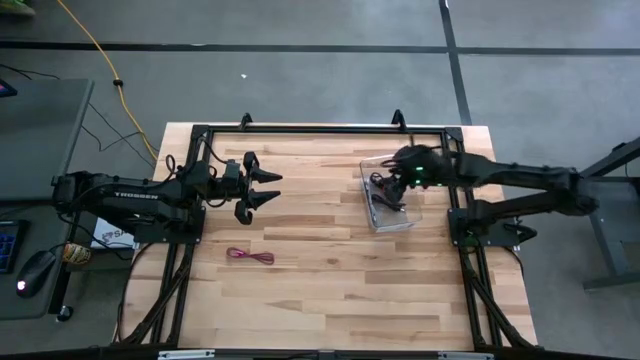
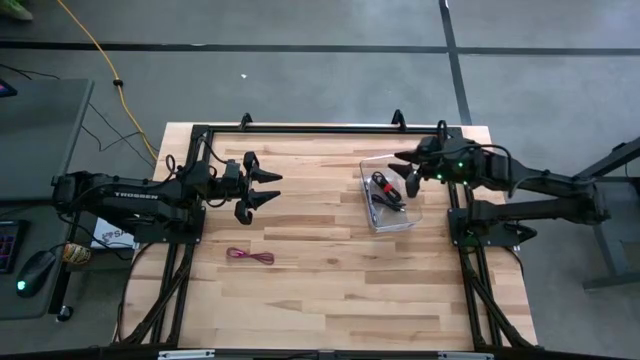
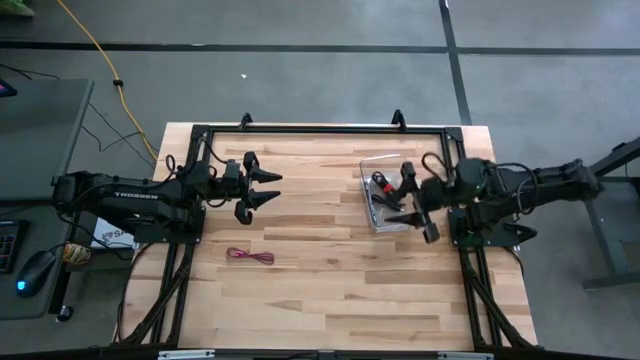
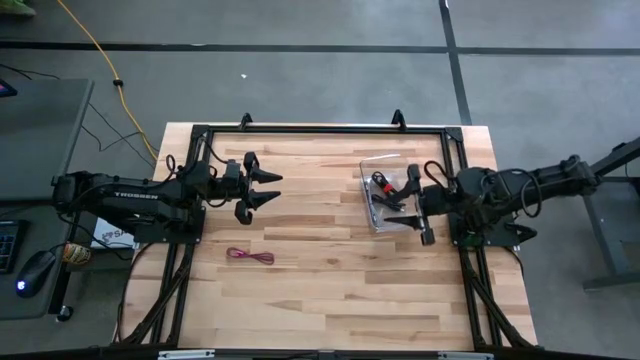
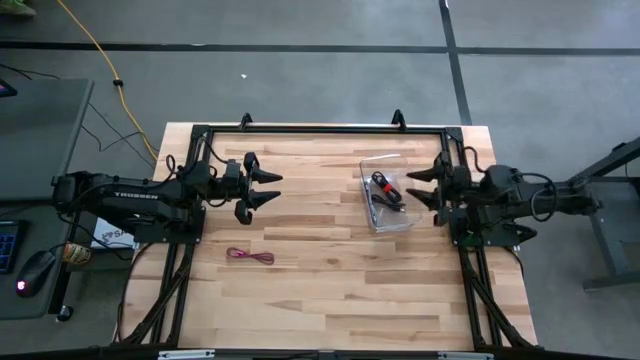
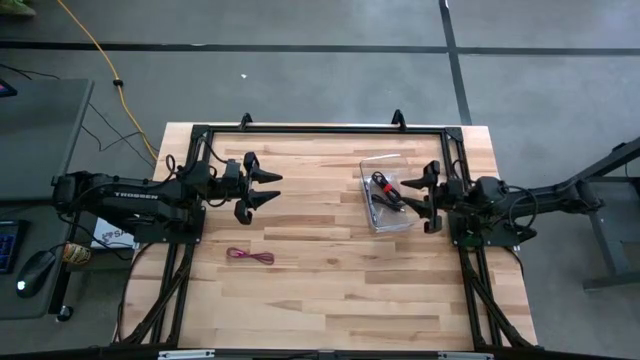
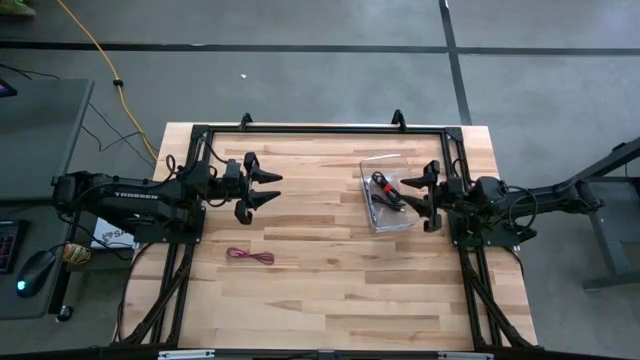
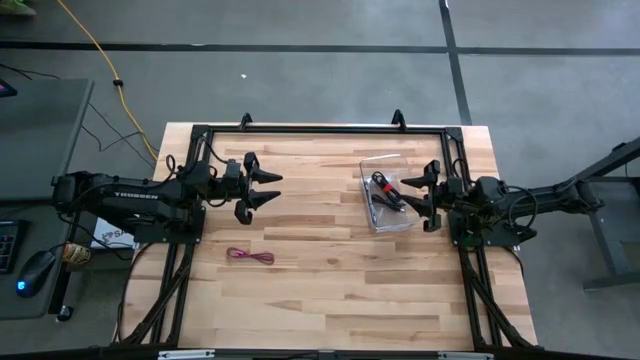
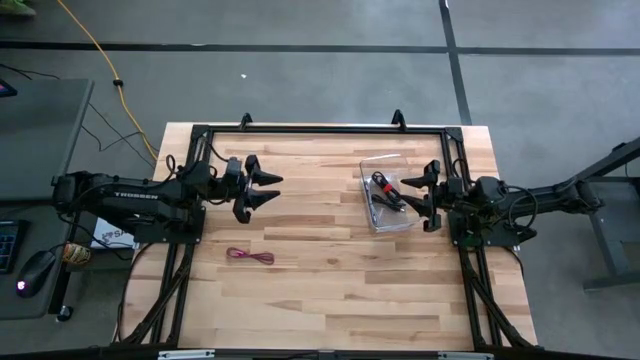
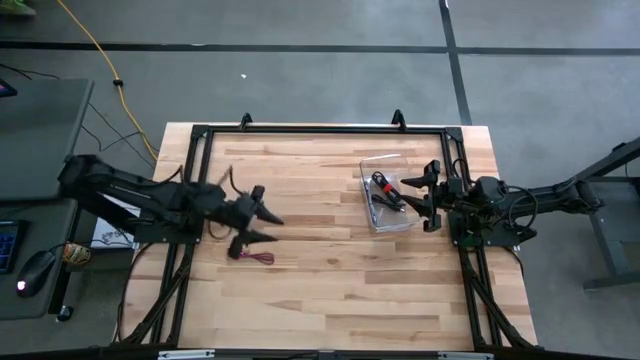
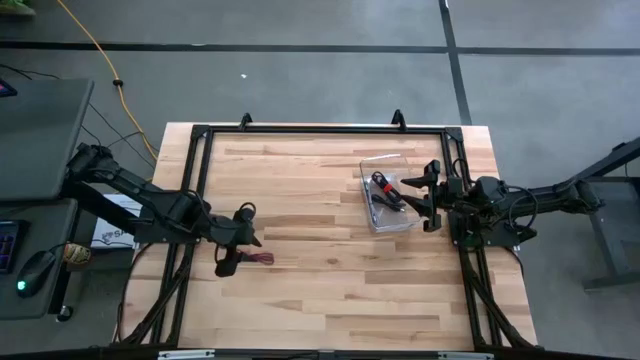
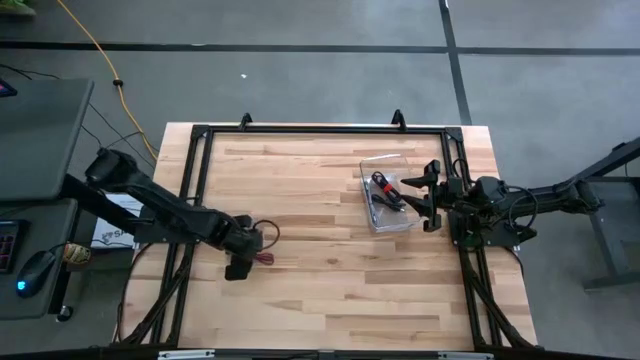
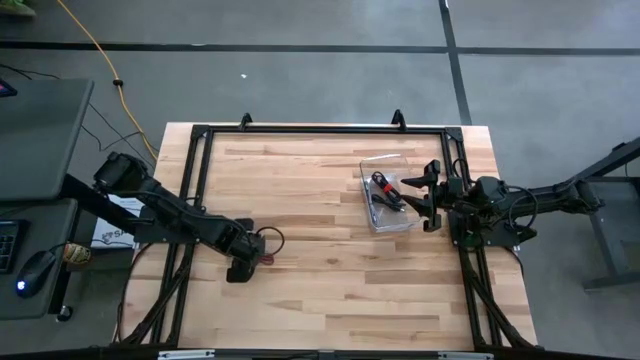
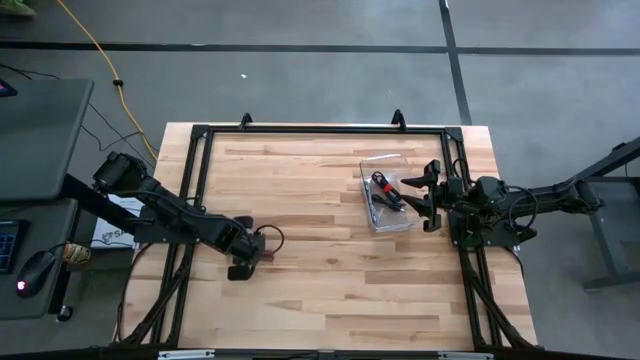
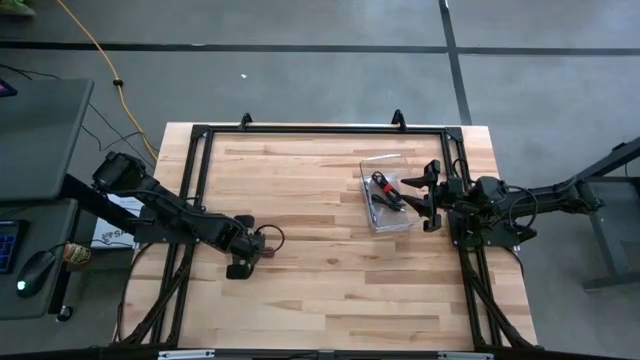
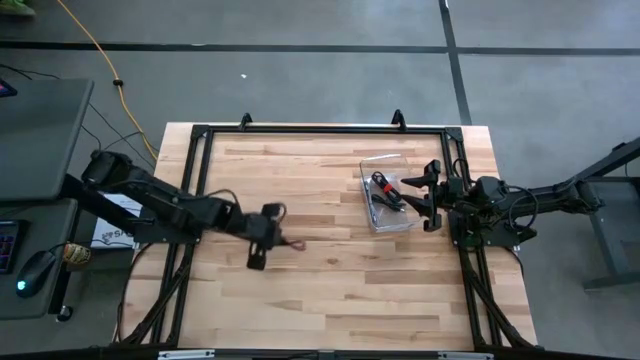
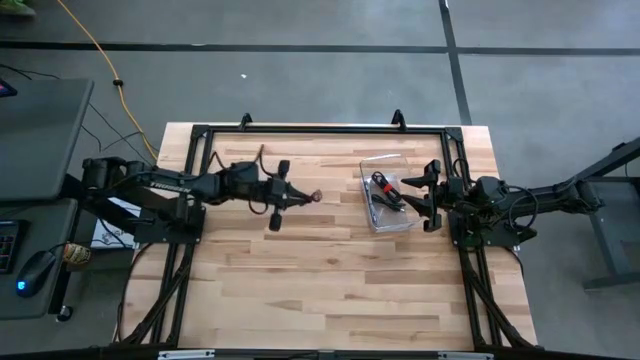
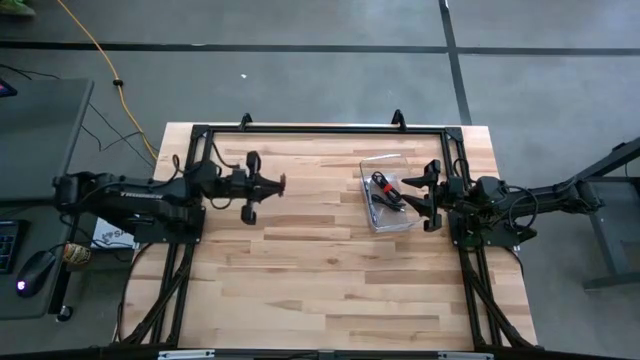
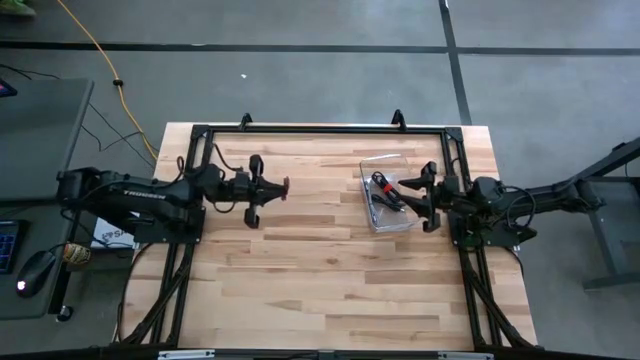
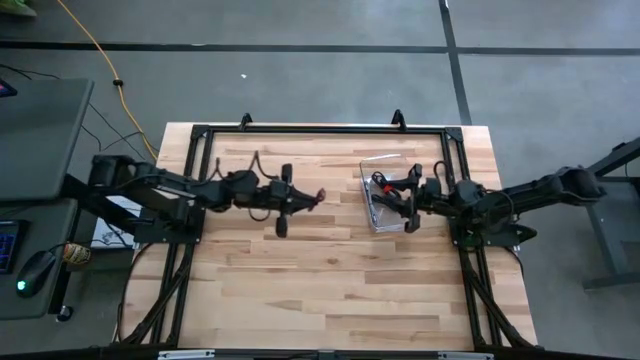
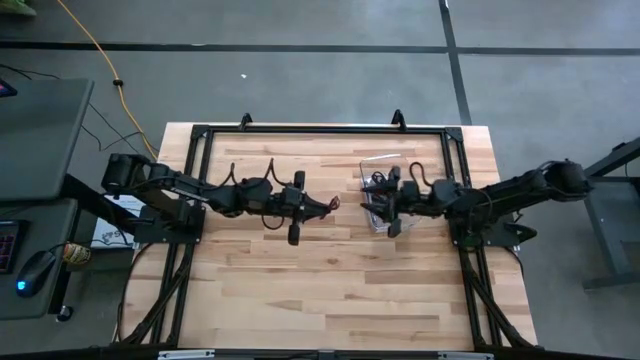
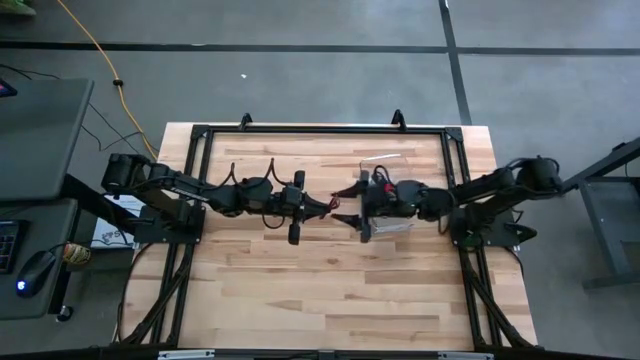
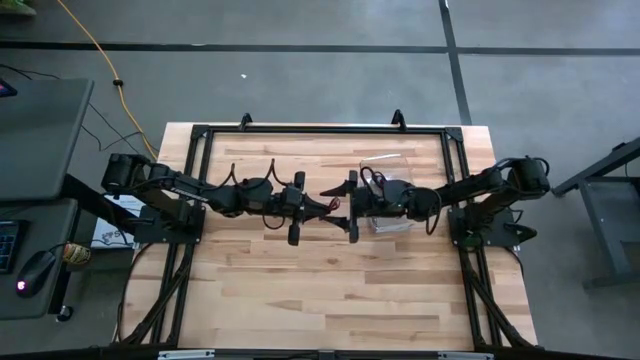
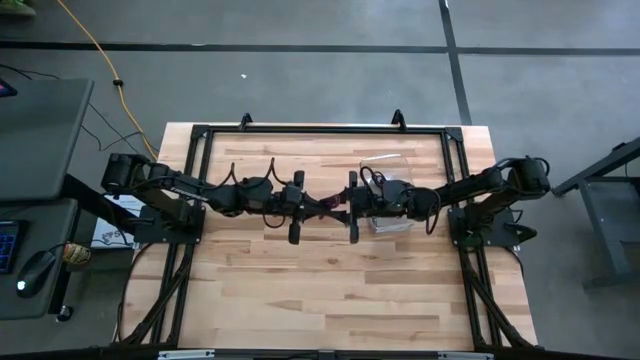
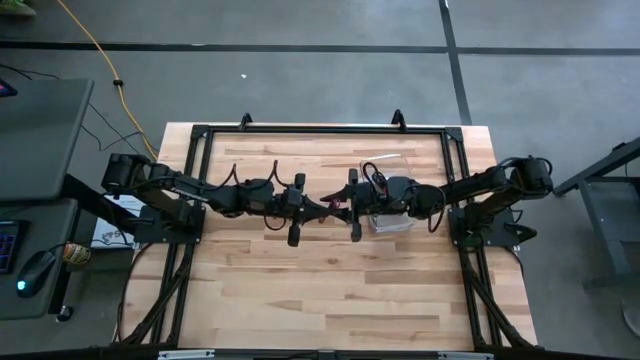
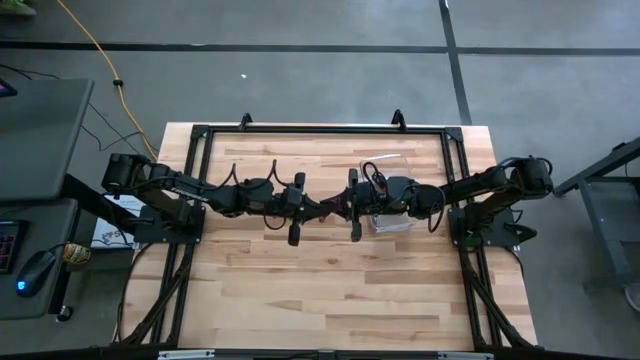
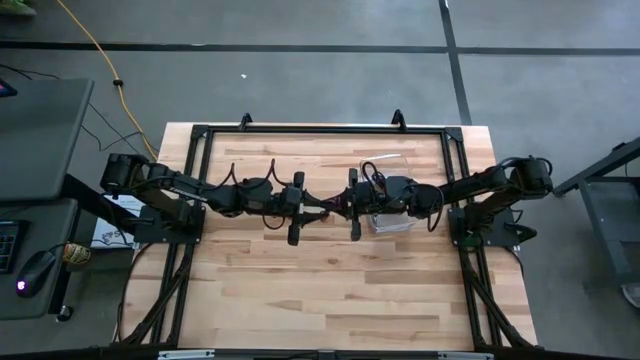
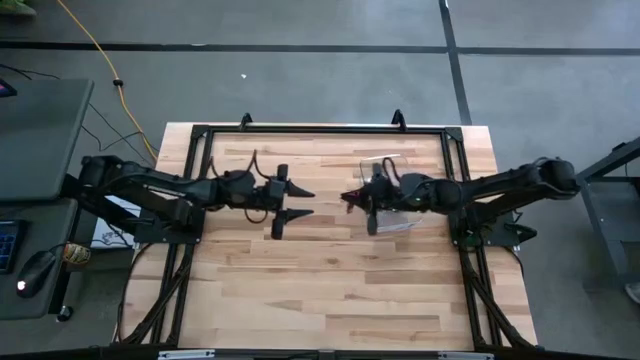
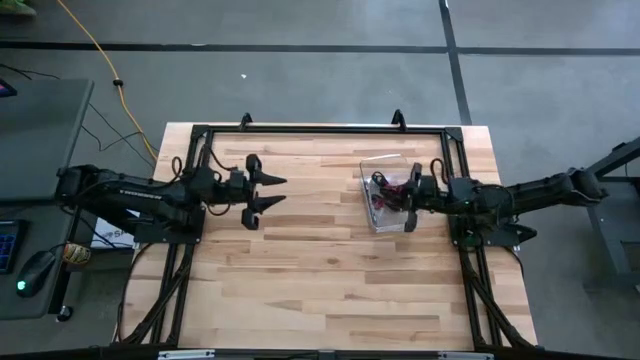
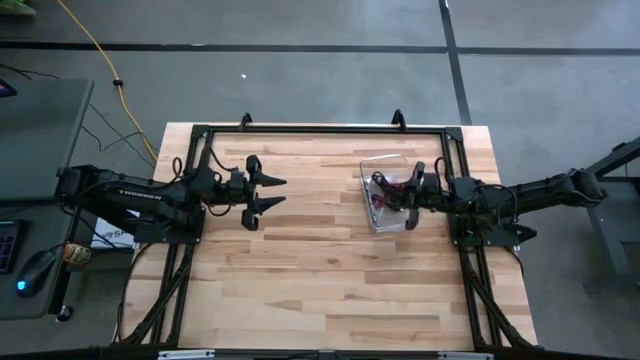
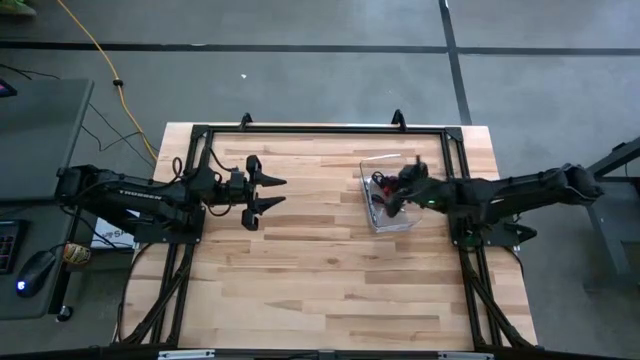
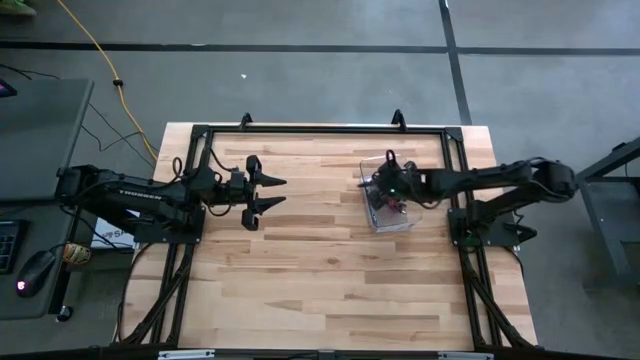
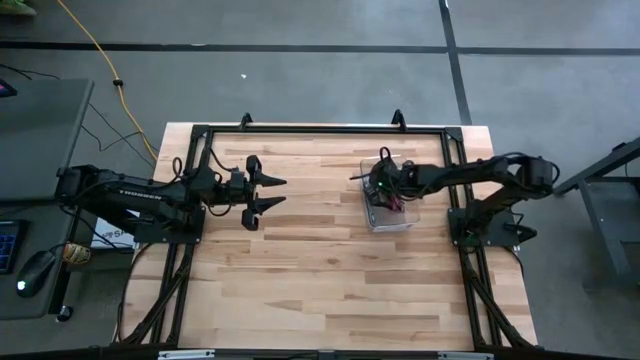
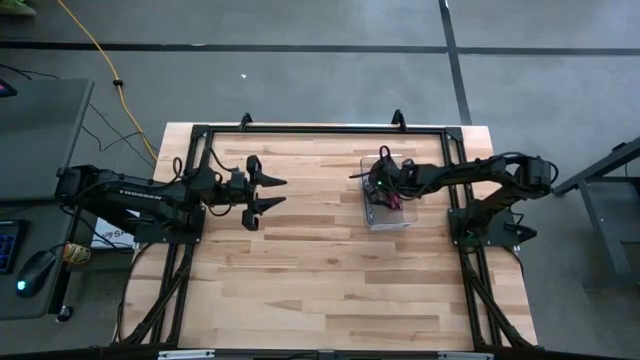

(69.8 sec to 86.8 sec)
Task: Pick and place USB-C Cables
Put the pink cable charger into the transparent bin

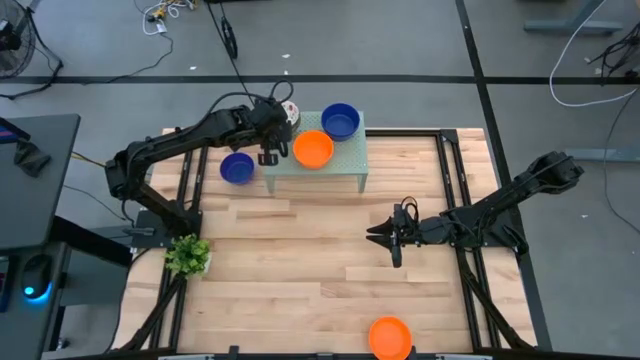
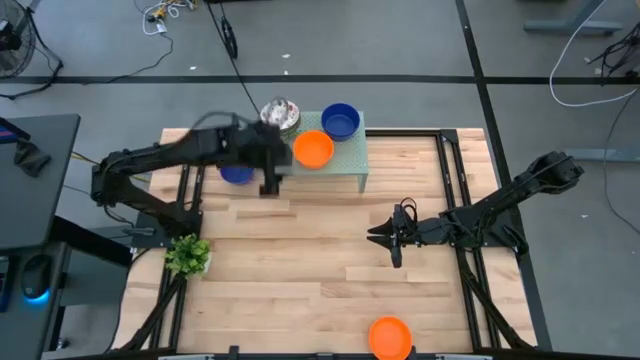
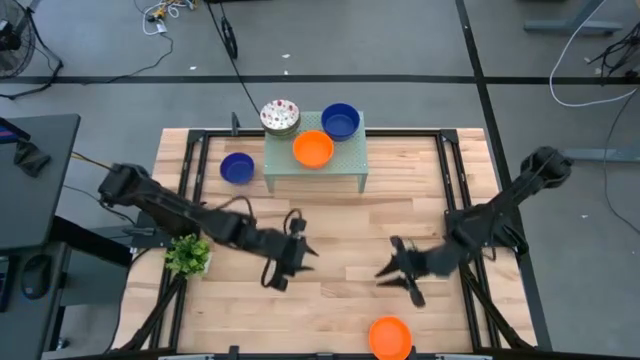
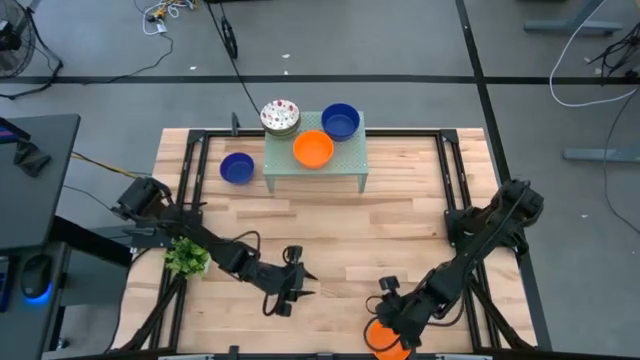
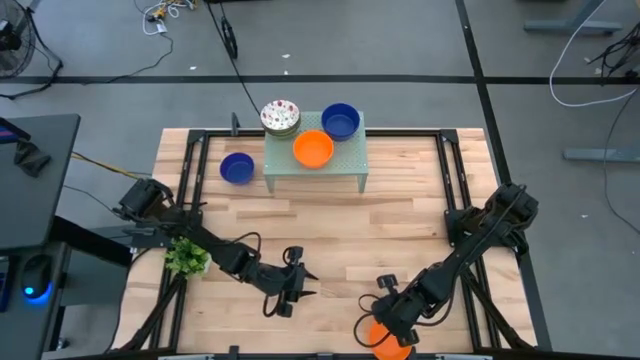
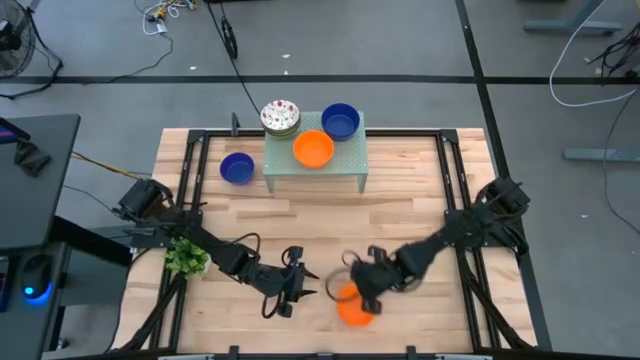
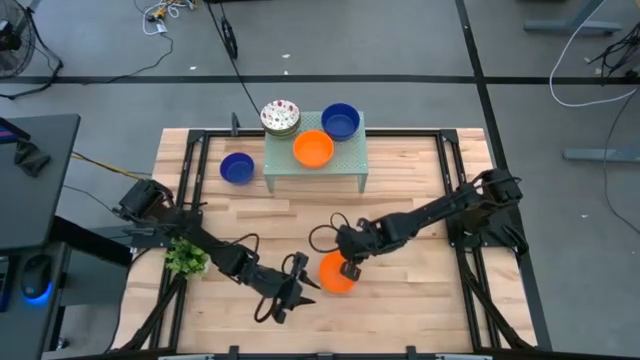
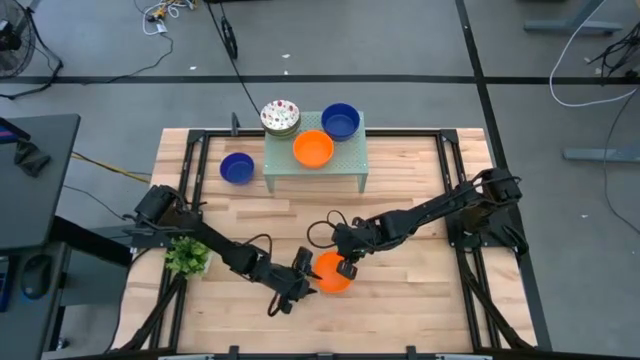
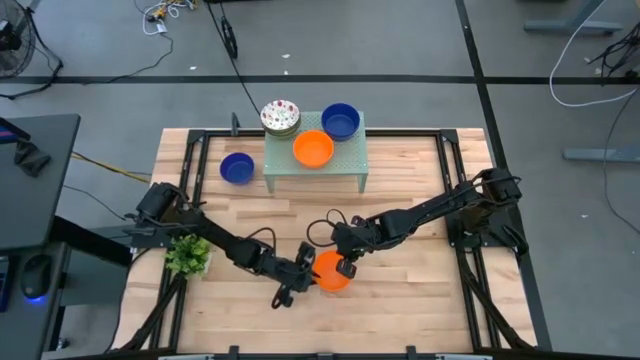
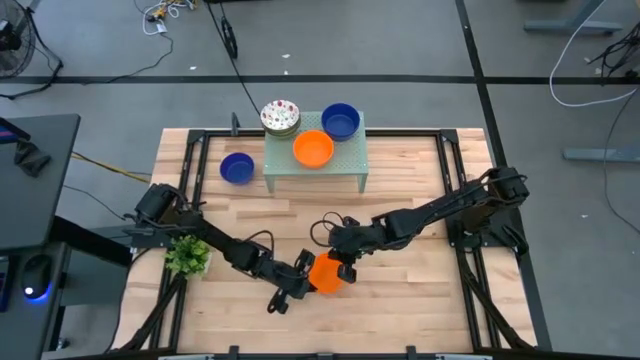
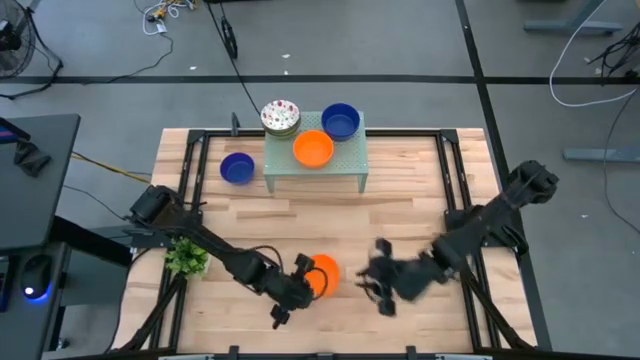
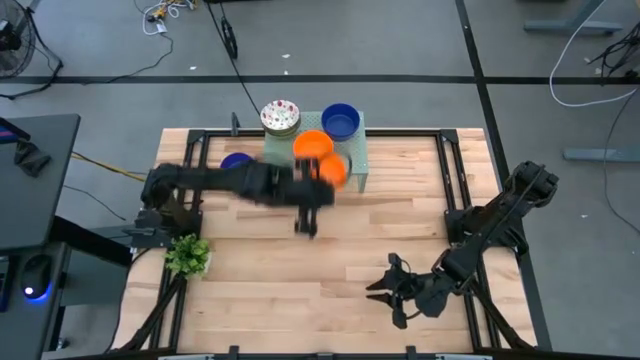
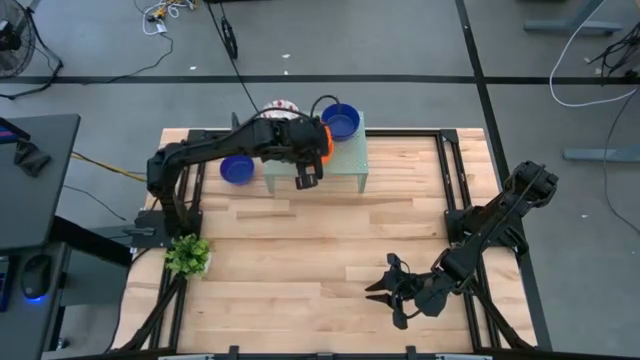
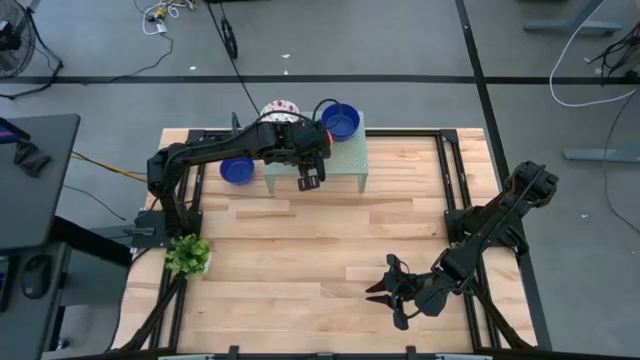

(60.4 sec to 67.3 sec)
Task: Pick & Place Mini bowls
Stack the orange bowl on the orange bowls on the shelf
